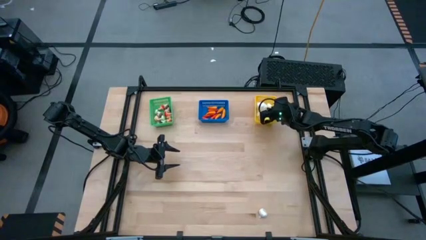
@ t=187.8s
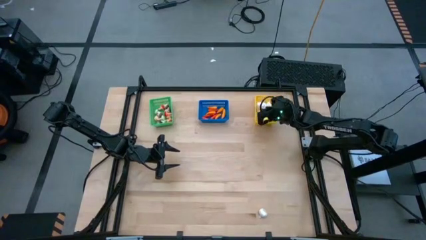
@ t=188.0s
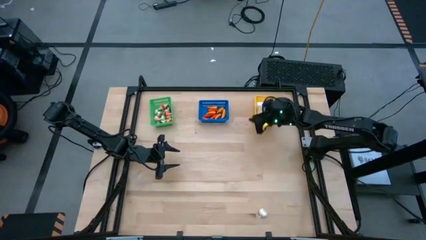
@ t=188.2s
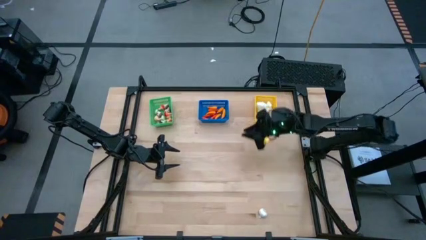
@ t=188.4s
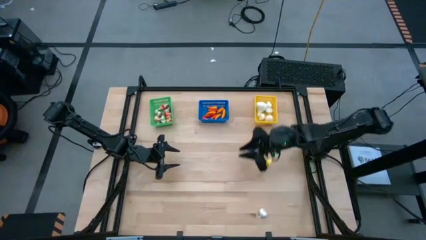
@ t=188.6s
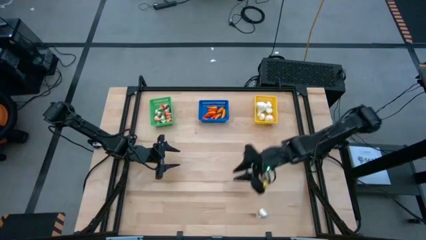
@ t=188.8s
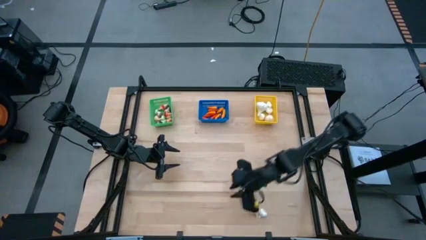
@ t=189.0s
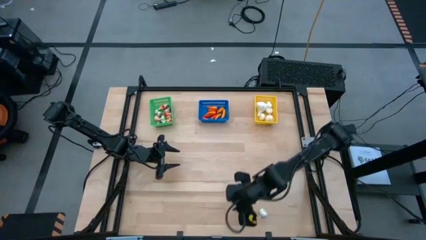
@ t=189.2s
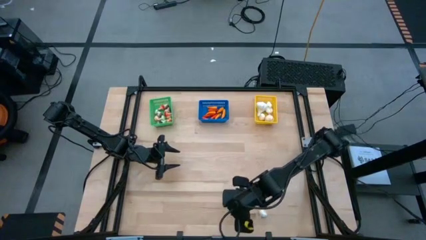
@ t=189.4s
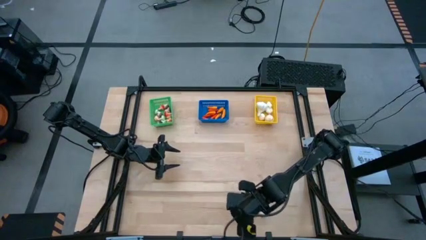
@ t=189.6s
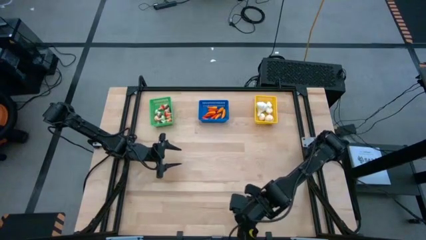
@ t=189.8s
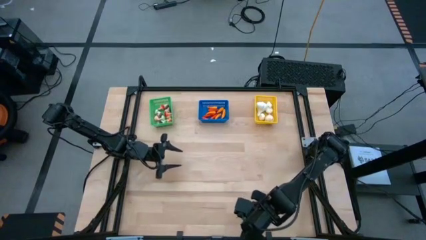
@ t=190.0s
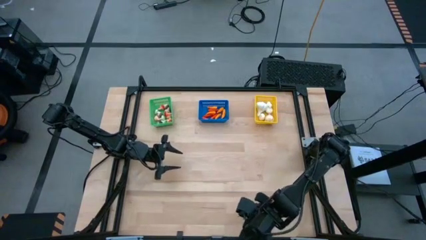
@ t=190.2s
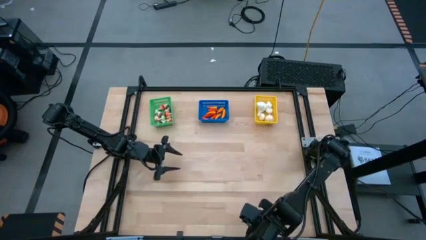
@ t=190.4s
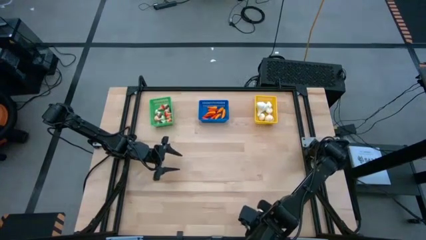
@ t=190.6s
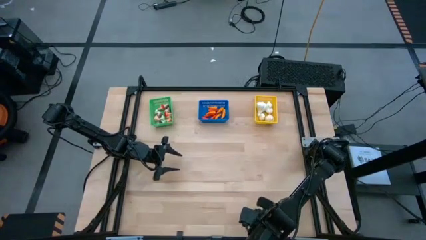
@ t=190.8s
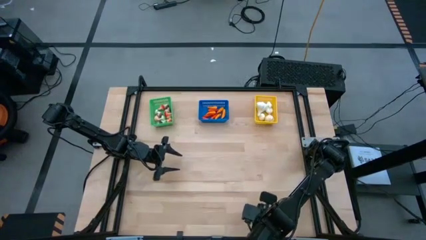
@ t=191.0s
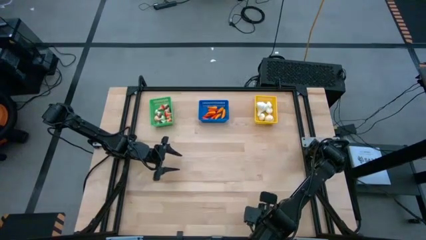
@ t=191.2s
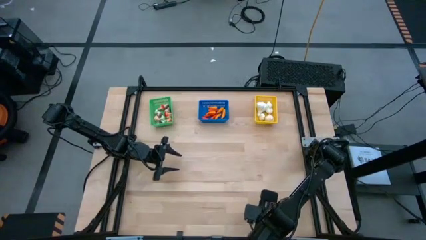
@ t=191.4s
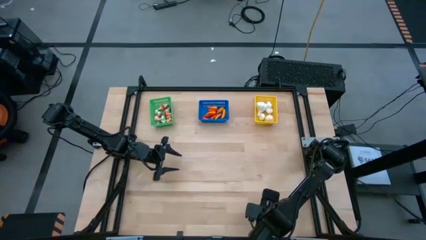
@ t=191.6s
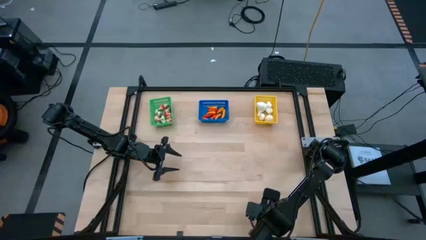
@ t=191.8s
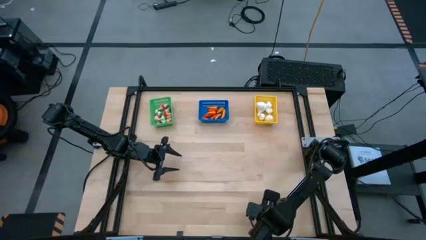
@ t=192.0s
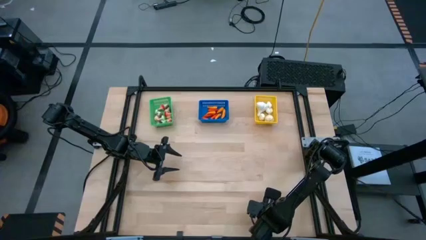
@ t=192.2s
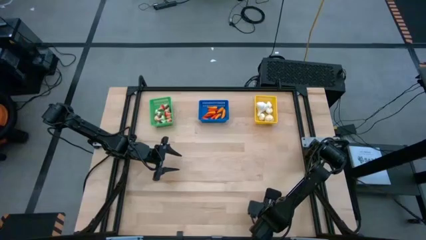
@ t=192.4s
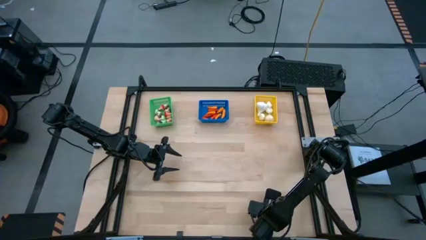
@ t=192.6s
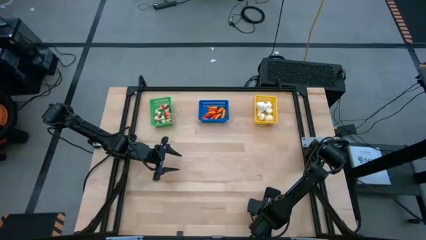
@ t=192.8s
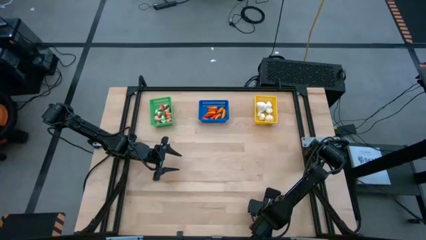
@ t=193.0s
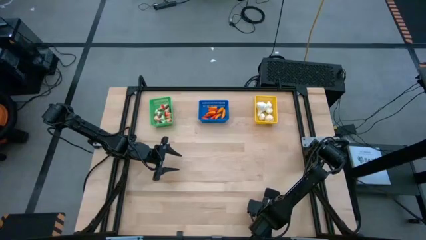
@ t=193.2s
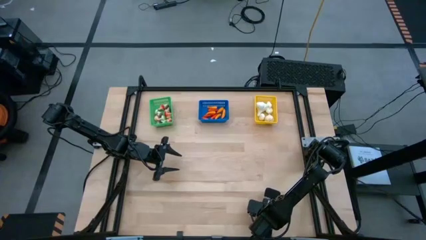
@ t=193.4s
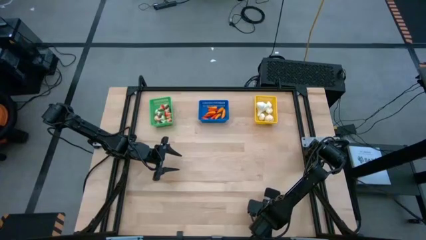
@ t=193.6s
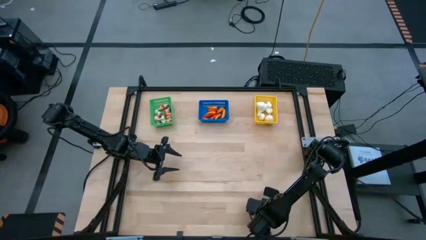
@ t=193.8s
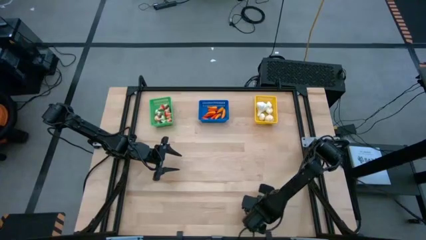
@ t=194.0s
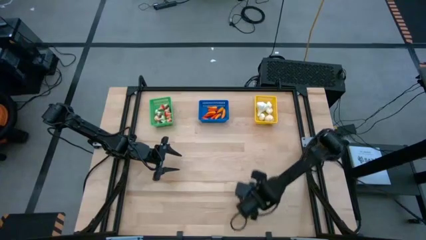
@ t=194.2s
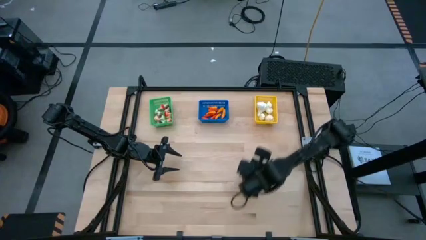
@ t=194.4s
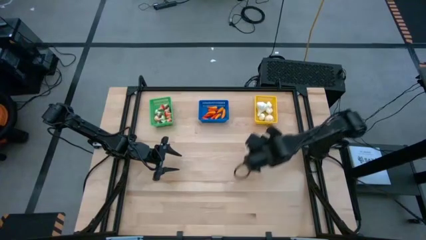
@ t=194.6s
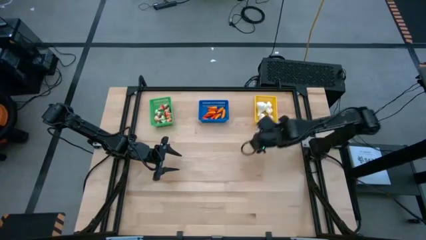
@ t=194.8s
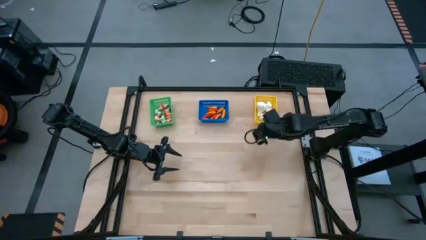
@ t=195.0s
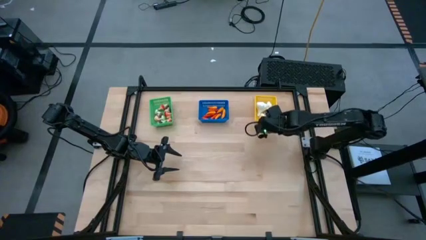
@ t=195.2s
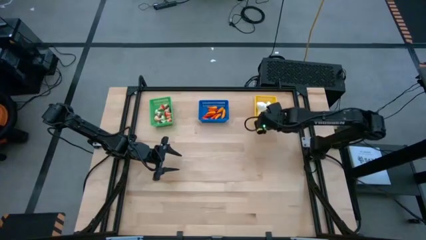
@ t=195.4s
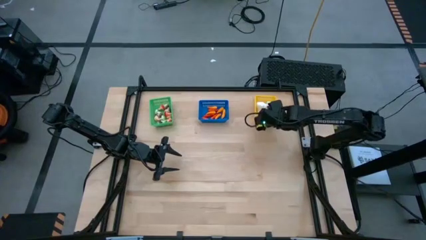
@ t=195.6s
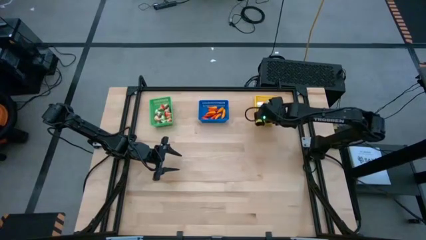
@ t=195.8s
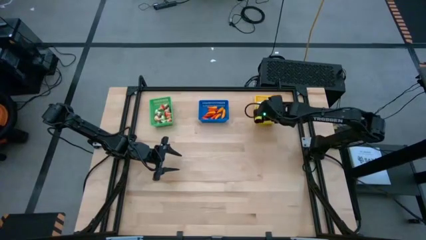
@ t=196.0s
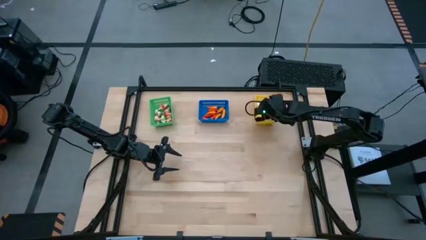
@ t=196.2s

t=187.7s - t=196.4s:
Task: Sort produce into baskets
Put the garlic into the yellow bin

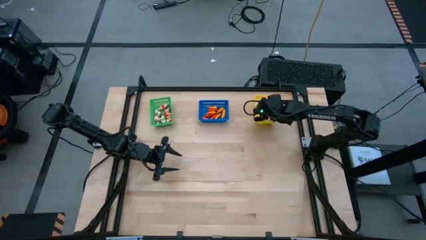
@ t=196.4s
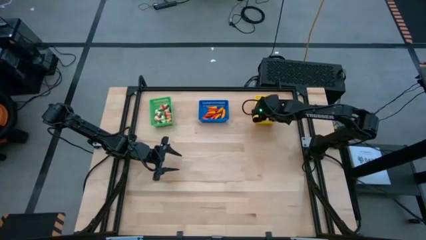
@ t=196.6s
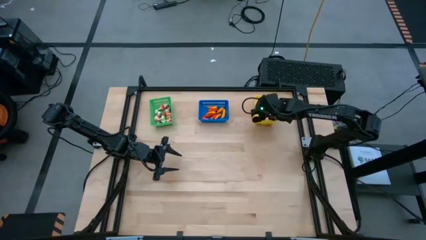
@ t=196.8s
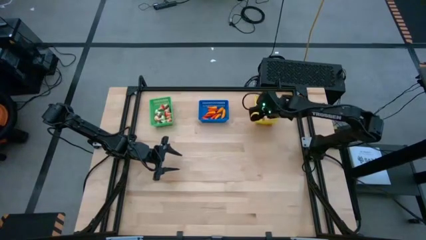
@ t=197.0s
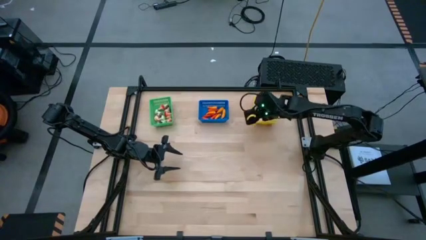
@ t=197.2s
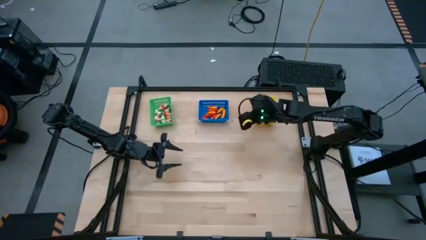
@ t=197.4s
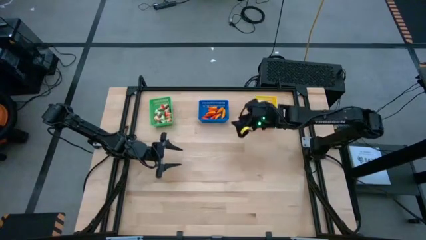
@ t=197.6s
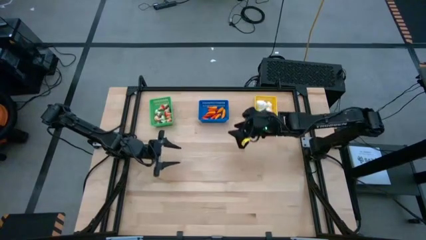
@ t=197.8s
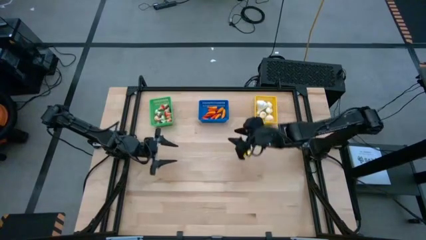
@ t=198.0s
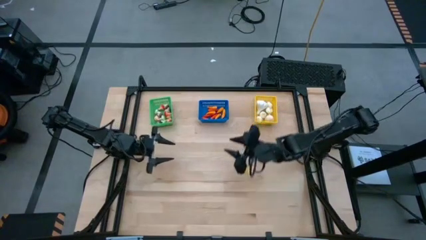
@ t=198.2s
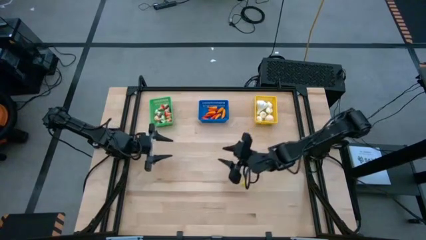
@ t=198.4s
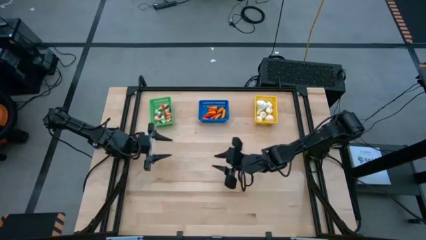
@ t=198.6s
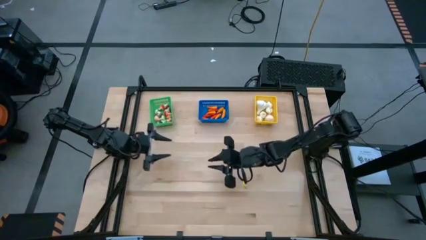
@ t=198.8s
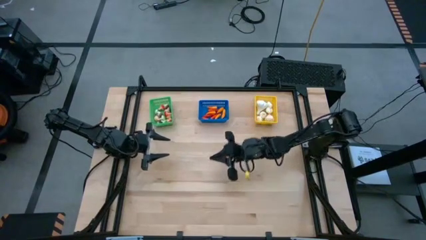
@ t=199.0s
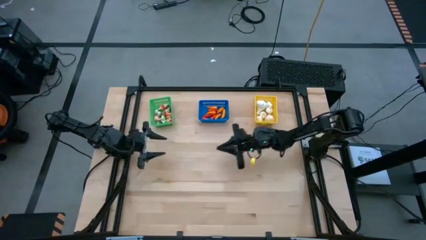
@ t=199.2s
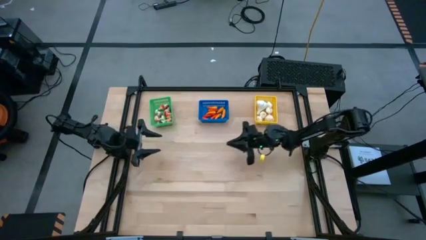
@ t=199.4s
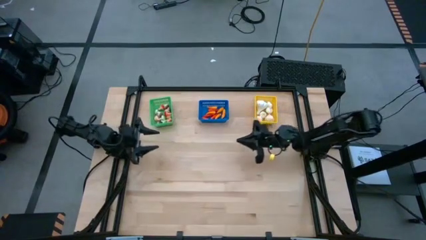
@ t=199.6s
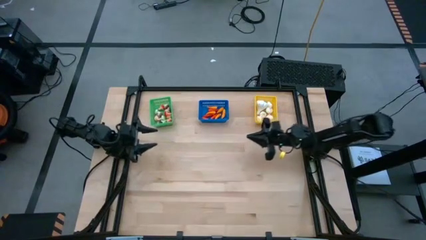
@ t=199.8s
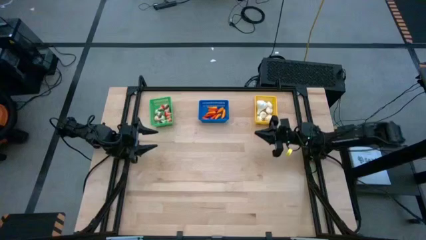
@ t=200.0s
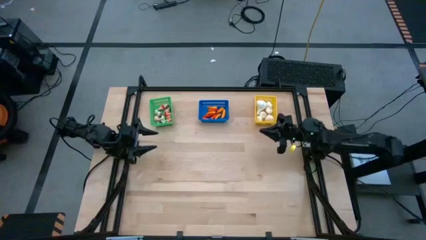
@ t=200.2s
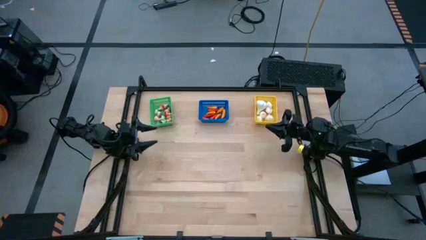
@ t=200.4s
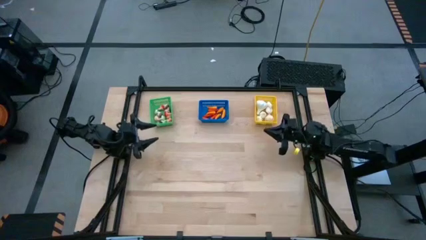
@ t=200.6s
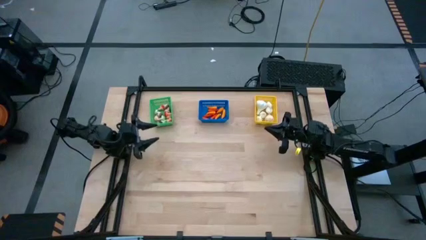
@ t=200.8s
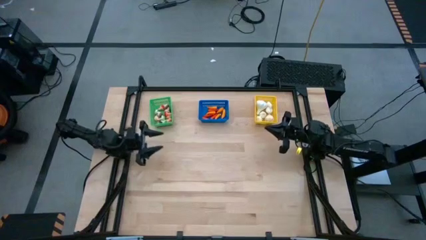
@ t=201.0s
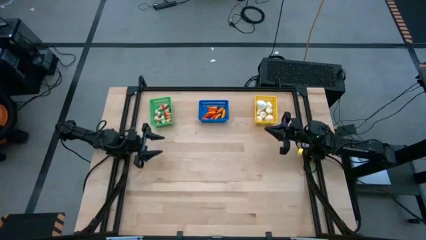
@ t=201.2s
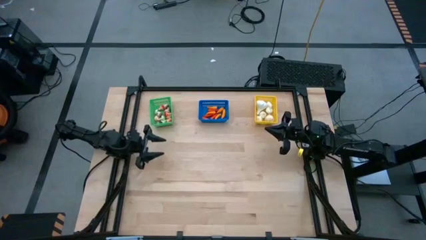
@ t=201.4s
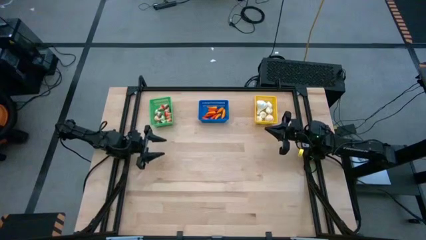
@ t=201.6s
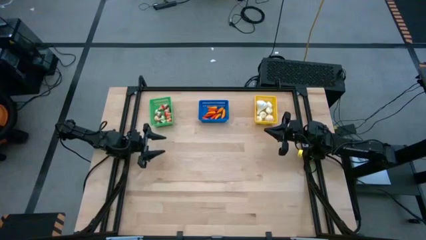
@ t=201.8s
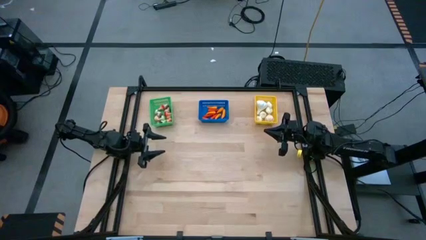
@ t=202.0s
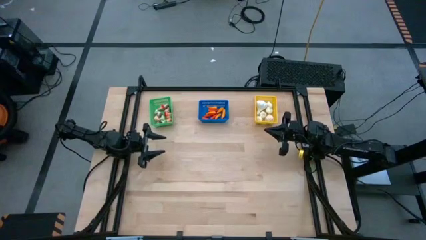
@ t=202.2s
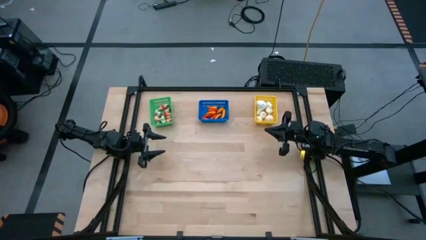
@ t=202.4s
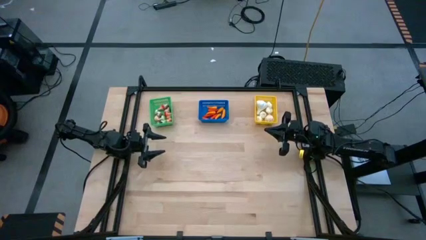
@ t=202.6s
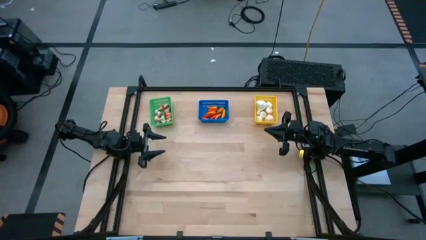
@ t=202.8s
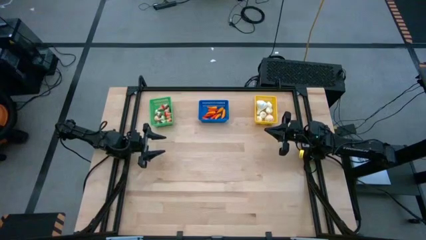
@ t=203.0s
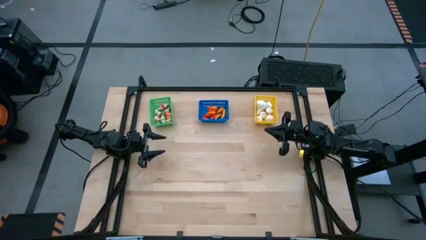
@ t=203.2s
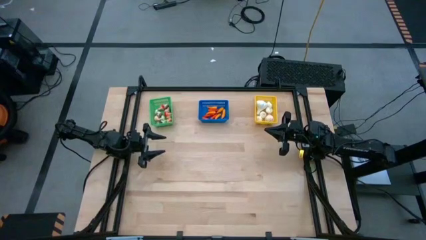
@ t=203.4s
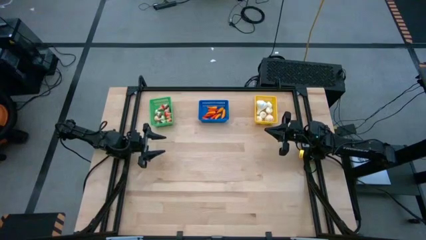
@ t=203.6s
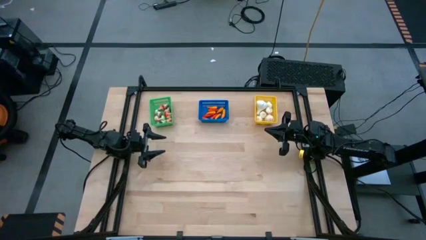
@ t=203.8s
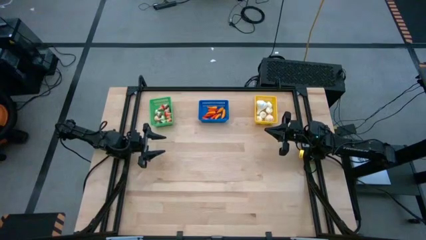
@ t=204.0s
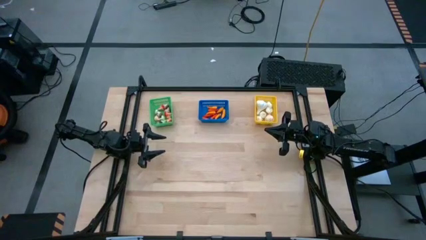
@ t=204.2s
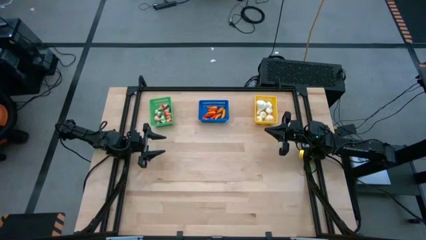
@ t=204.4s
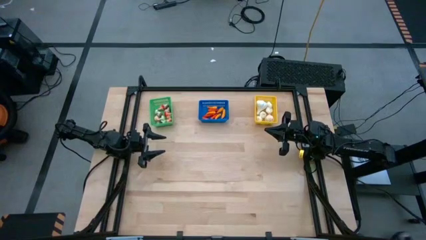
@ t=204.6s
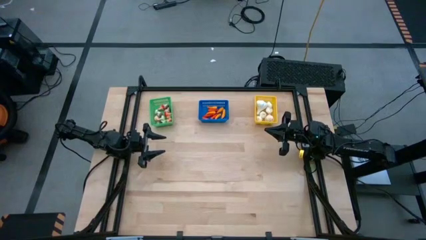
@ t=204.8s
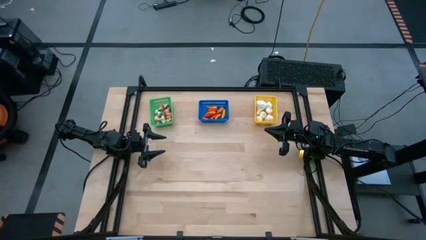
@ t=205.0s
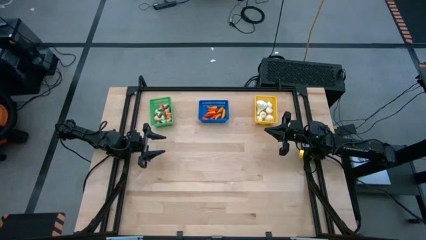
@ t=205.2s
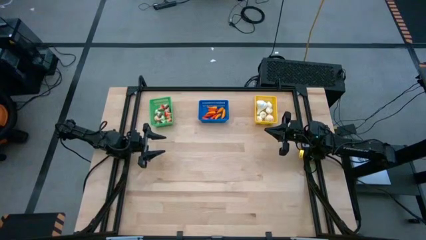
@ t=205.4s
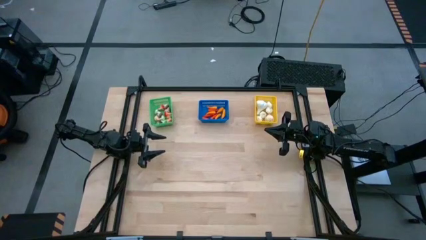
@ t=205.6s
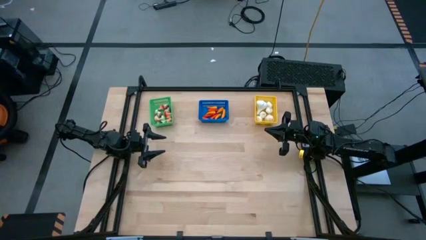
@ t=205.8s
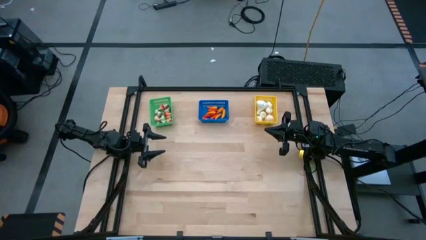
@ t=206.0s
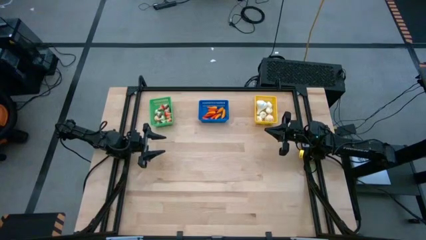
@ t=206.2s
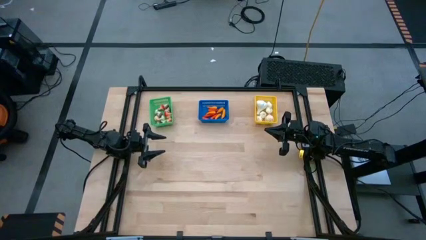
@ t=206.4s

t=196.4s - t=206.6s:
Return to Home Position
